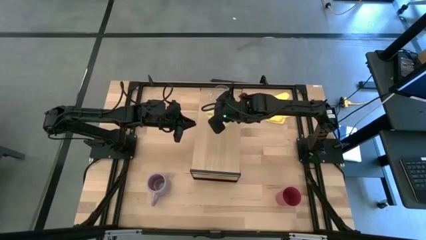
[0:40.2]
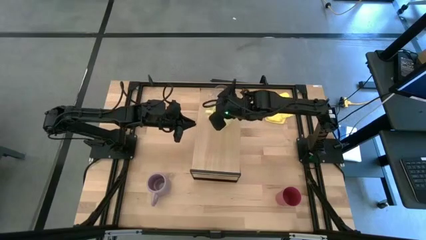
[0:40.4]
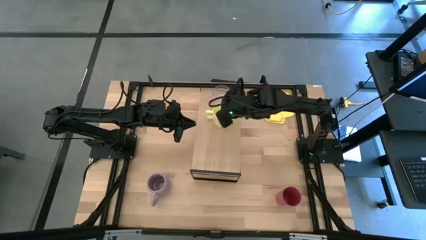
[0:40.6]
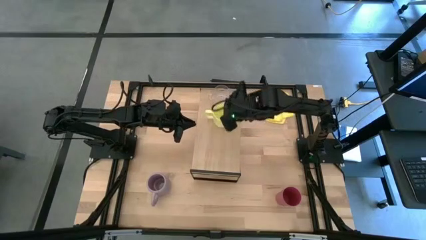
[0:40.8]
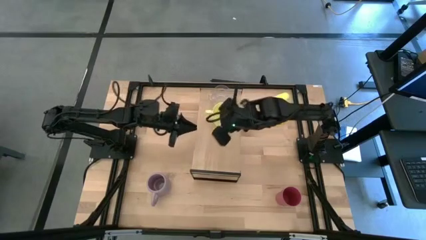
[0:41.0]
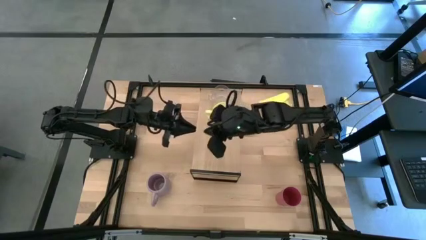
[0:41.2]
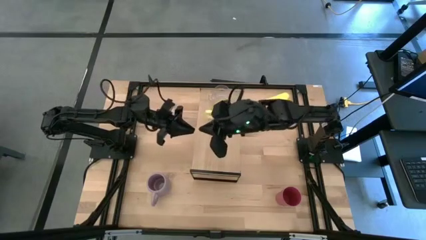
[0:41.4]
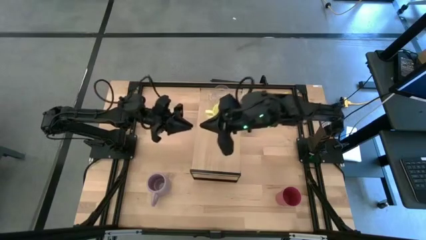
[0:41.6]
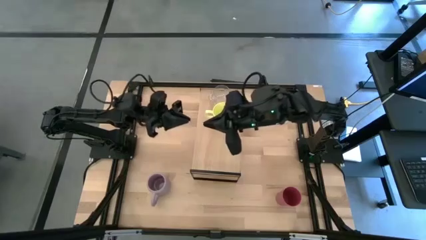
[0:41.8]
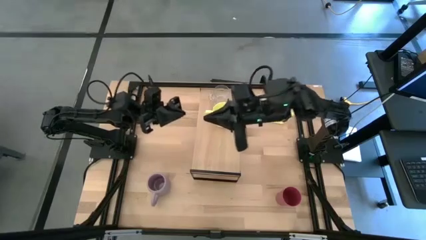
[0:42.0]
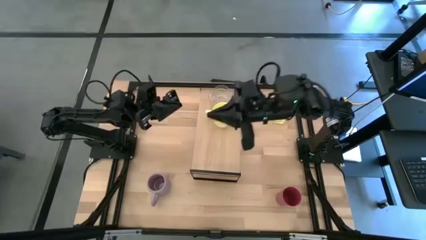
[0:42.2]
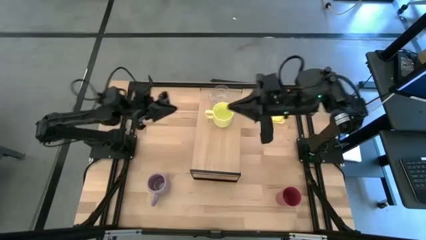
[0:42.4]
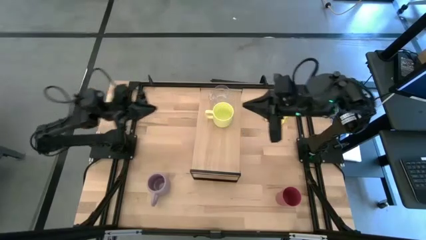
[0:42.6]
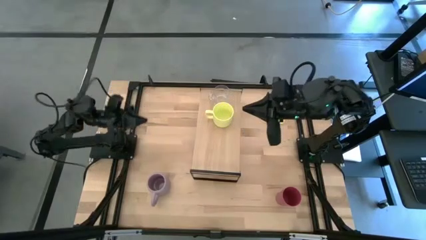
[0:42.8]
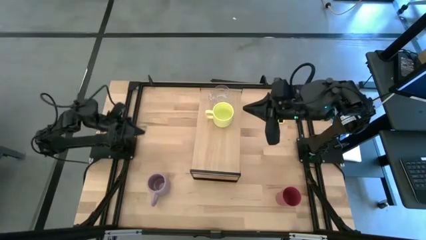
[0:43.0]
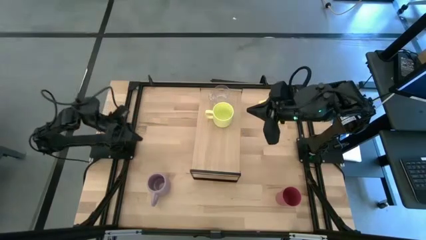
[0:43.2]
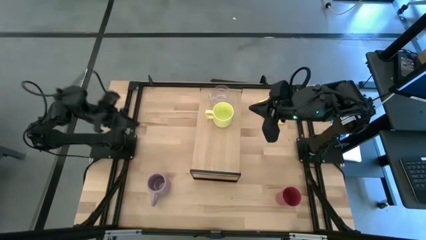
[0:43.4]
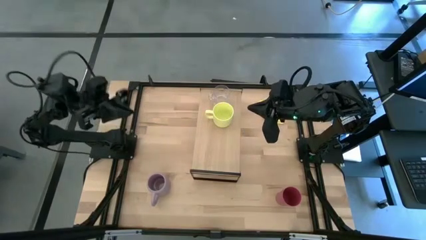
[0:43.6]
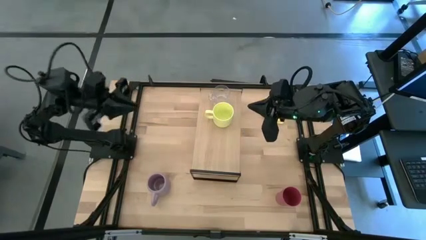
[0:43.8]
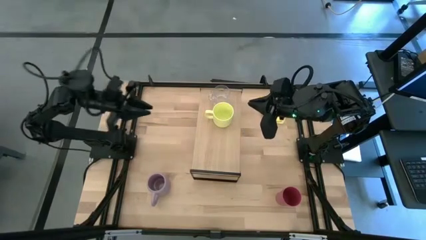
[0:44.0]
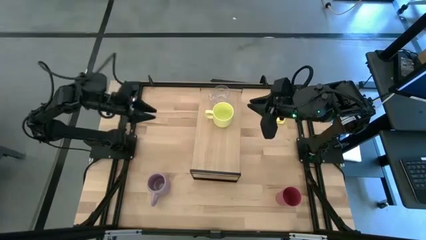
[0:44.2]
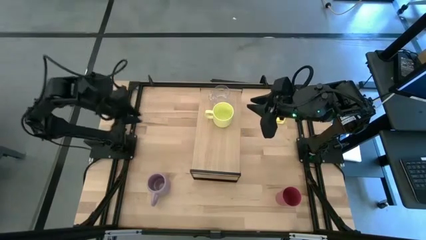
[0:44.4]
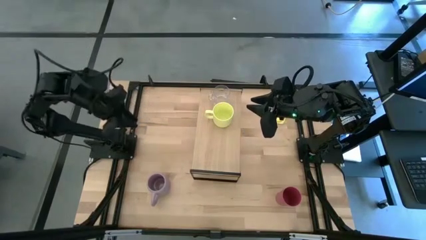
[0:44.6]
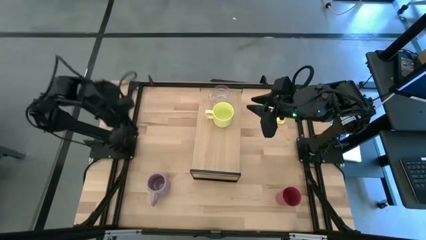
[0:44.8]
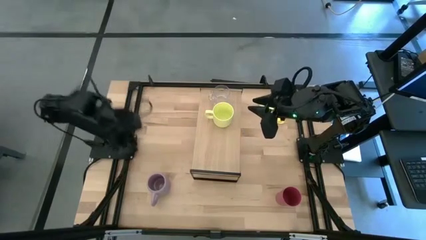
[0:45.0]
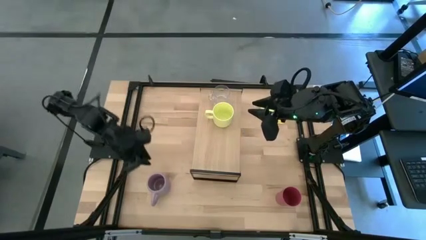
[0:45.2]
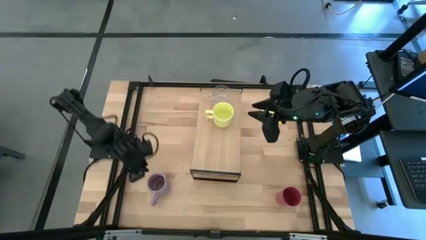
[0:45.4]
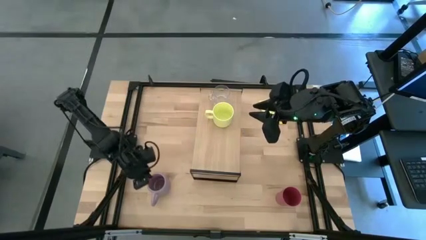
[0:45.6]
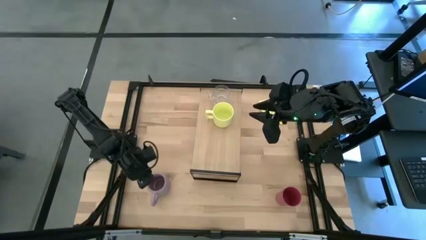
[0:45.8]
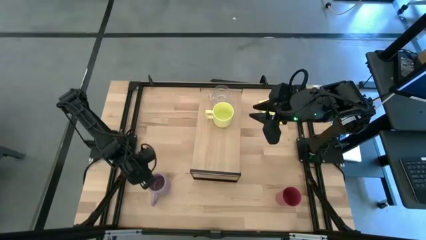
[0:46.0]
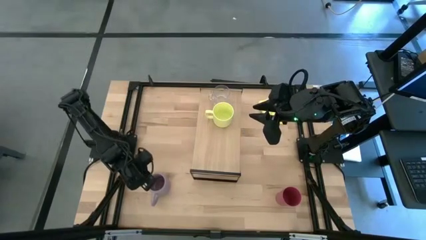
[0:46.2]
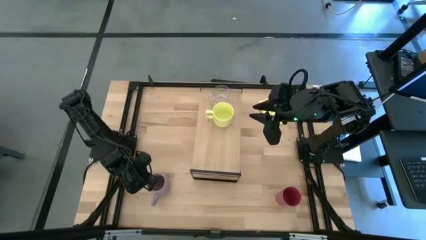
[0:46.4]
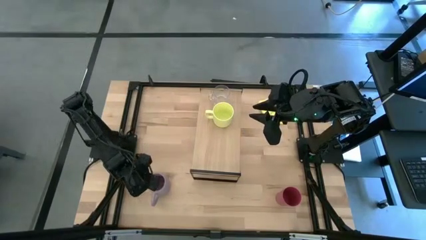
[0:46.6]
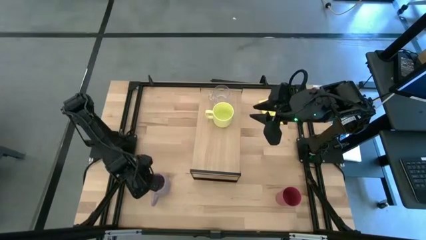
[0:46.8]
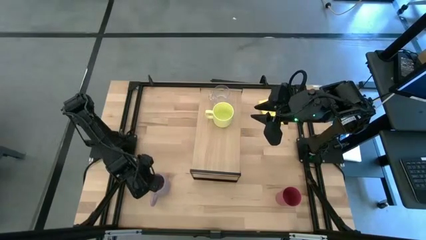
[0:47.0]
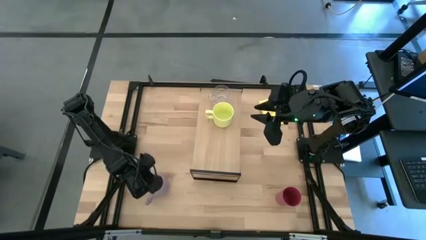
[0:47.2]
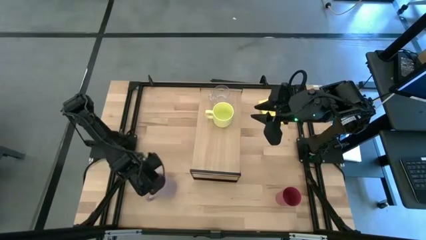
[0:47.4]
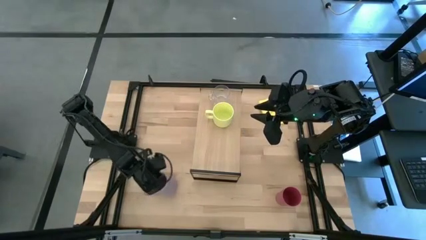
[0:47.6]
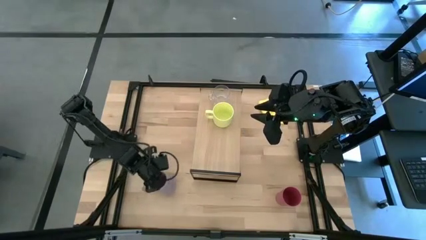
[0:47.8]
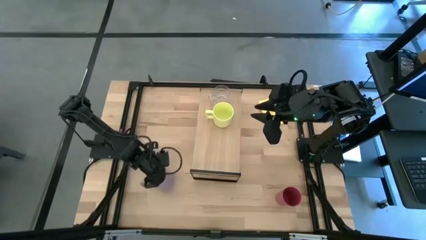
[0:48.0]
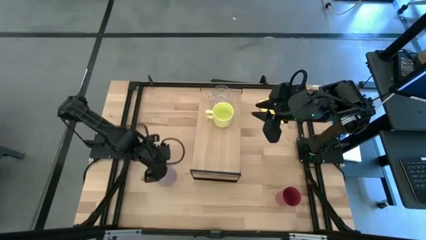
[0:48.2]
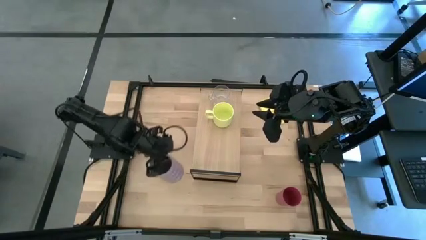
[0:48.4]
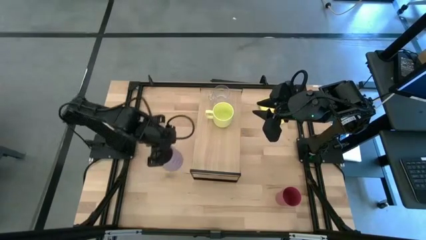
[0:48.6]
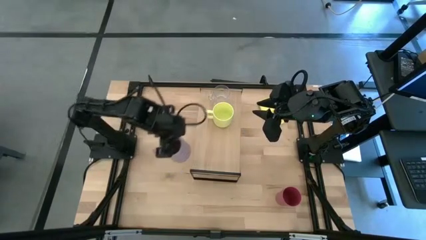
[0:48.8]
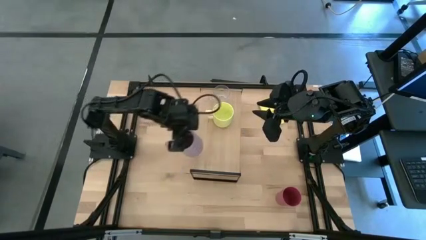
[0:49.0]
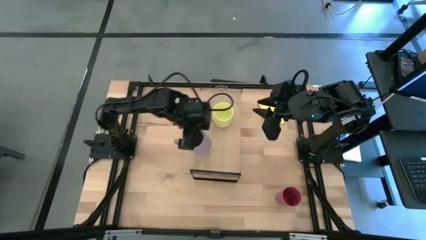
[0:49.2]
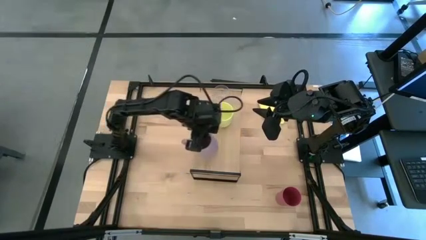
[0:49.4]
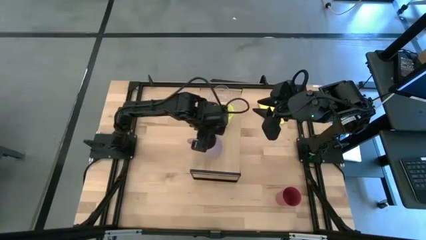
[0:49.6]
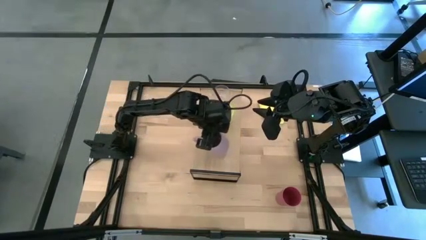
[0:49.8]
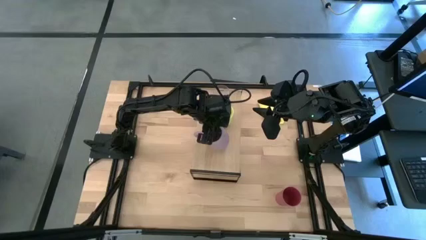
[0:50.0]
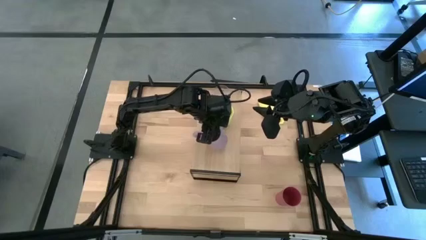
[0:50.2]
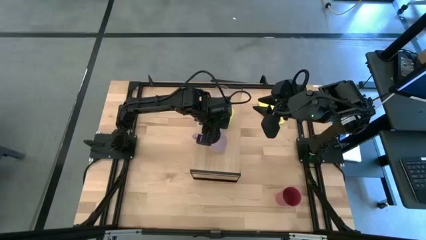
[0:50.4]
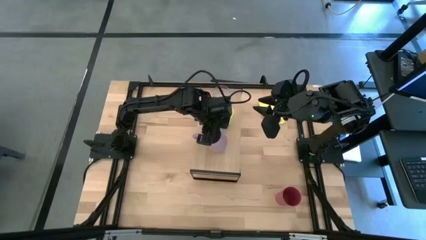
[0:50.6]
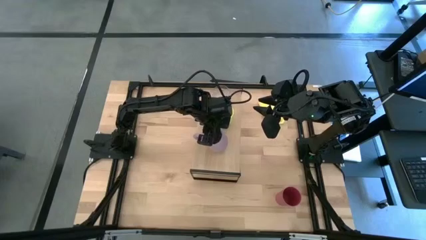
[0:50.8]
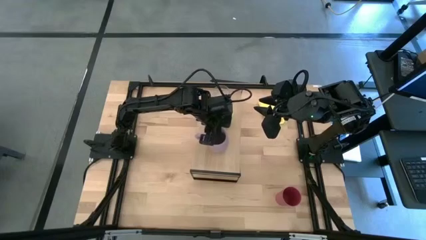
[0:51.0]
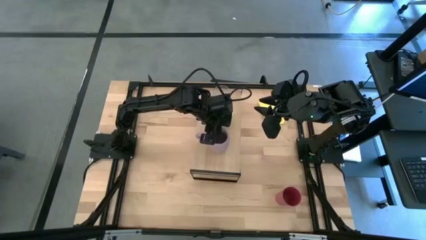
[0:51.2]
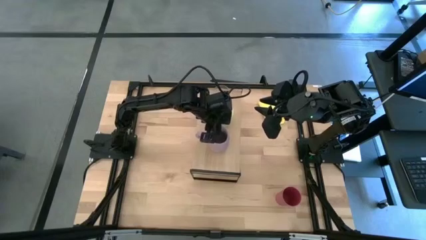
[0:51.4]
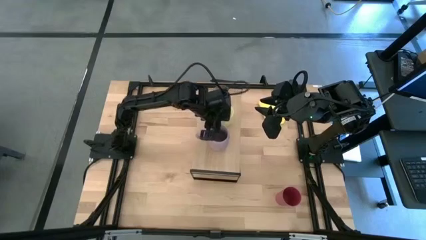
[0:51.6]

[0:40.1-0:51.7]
Task: Stack small to large cups/mugs on shelf
Put the violet mug on the shelf
